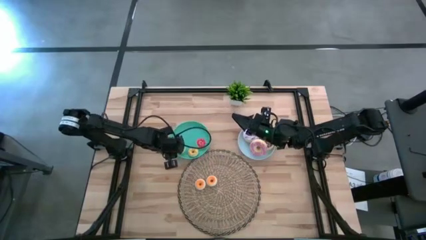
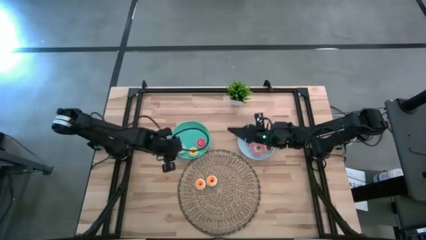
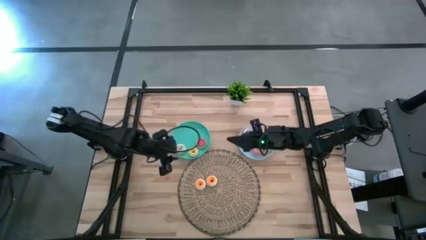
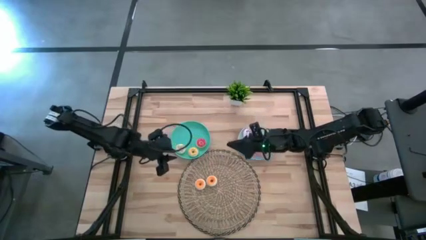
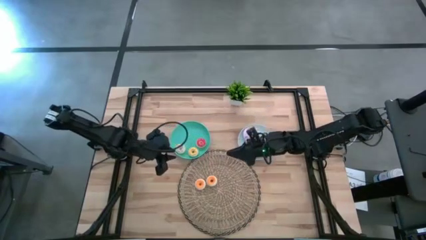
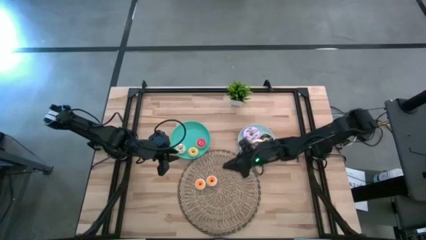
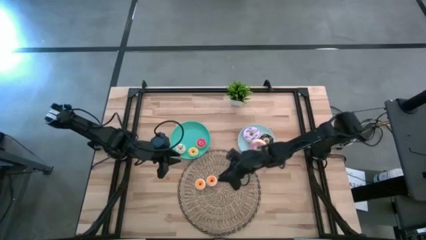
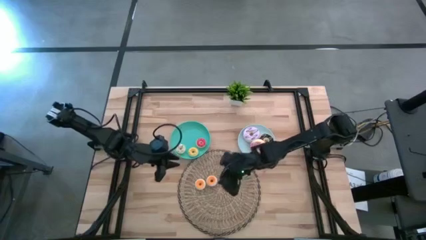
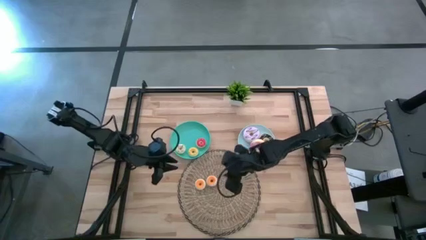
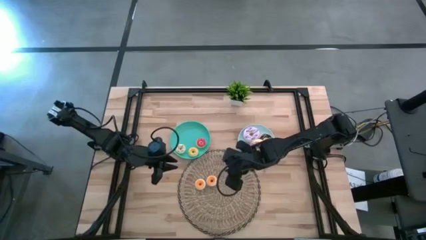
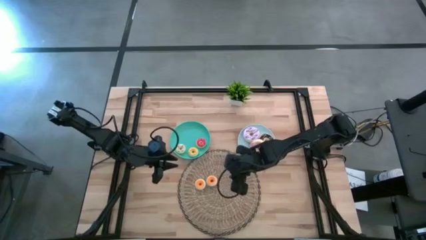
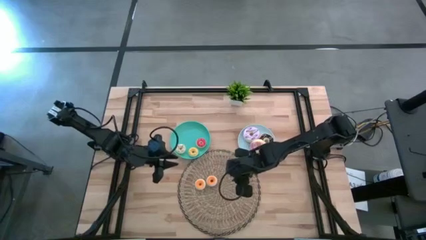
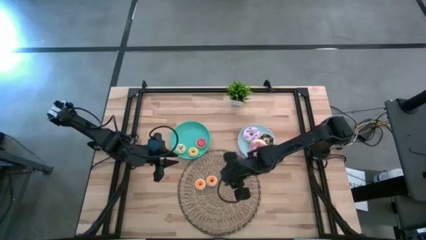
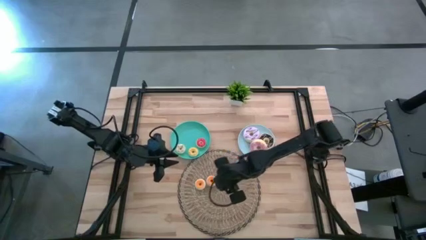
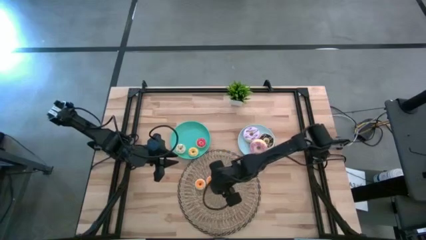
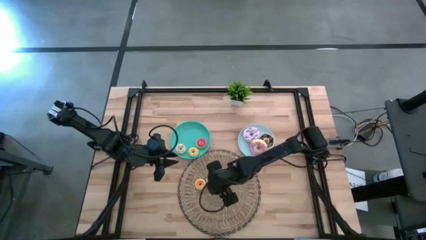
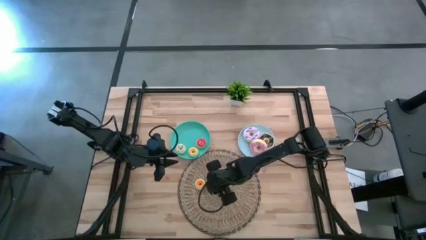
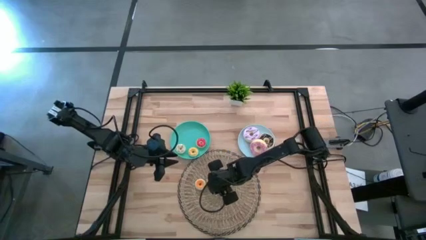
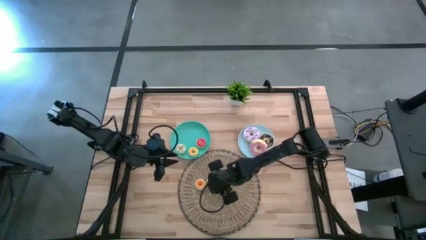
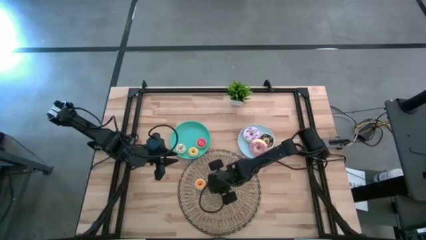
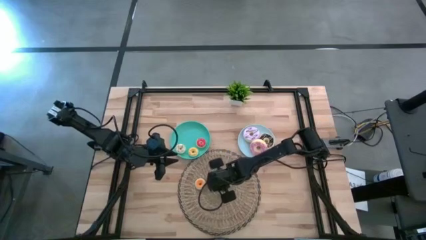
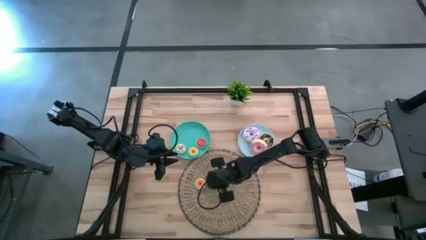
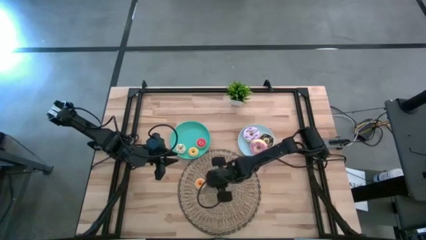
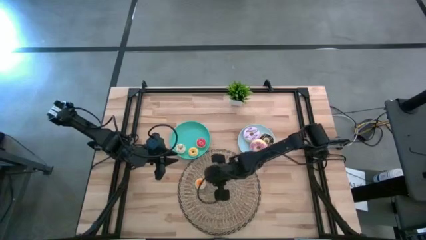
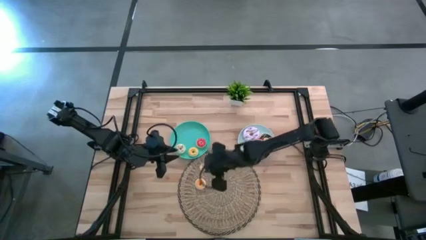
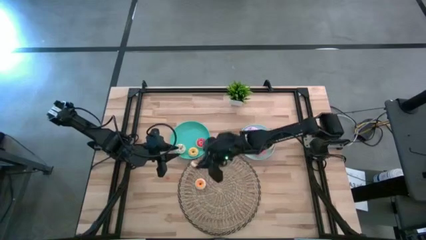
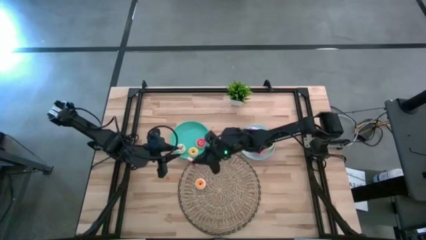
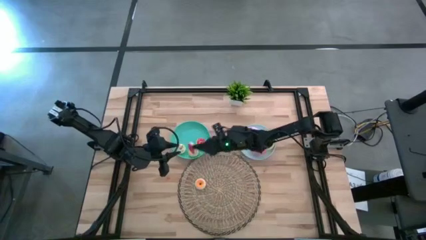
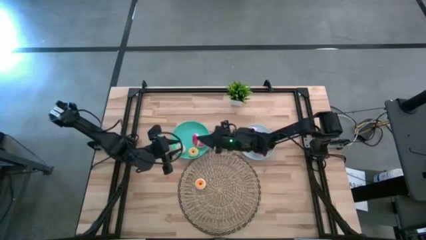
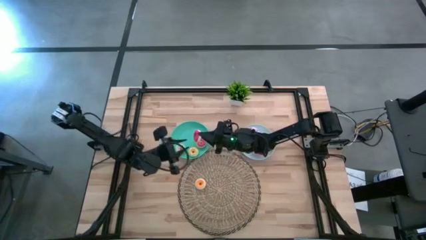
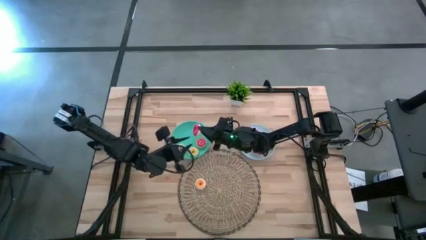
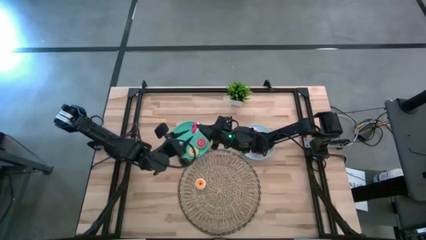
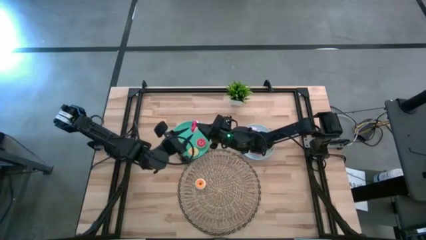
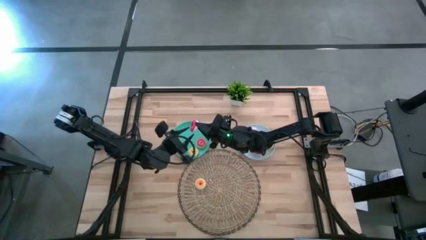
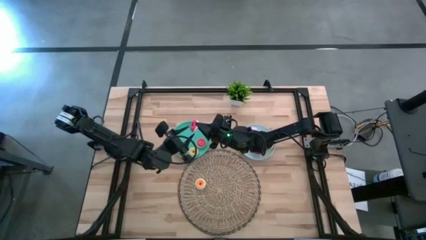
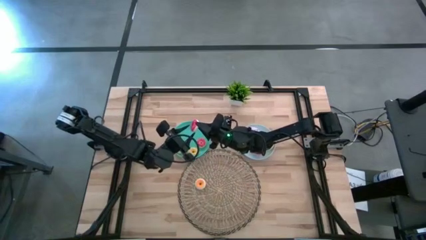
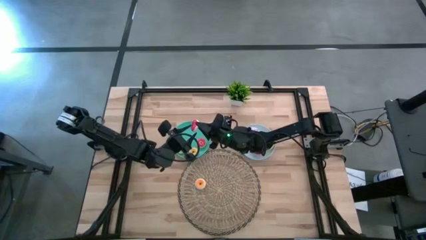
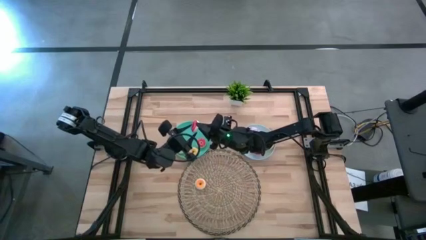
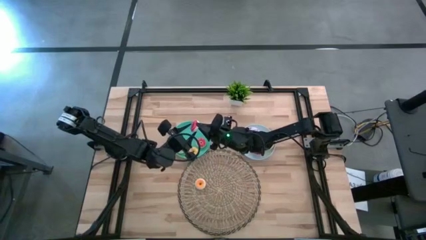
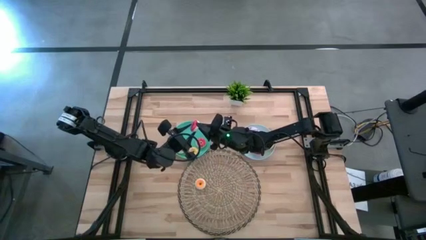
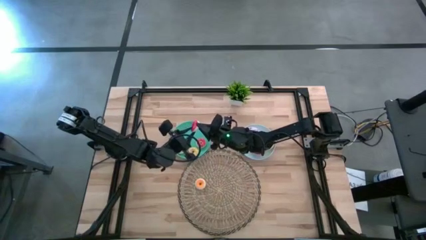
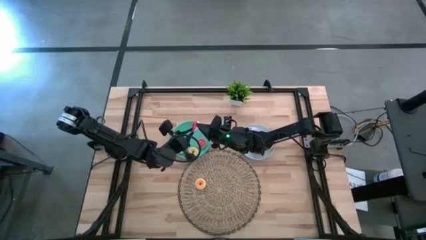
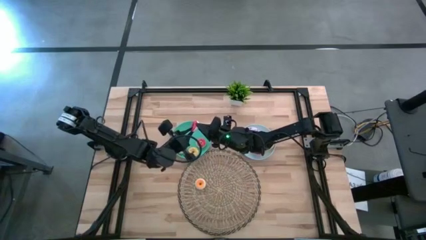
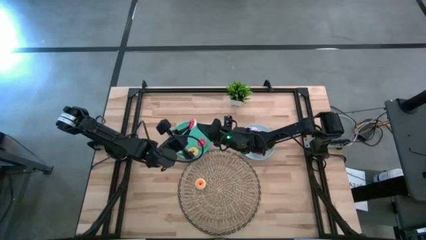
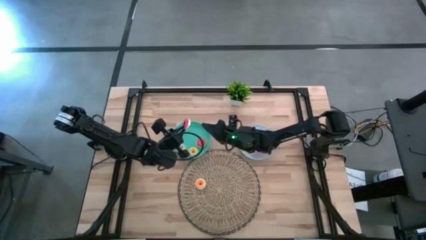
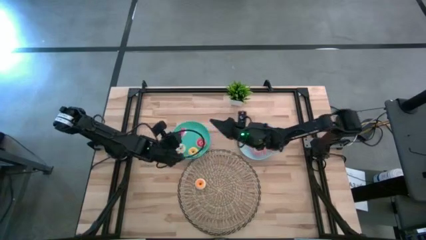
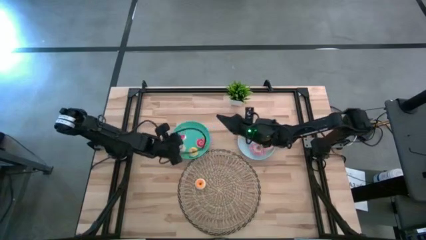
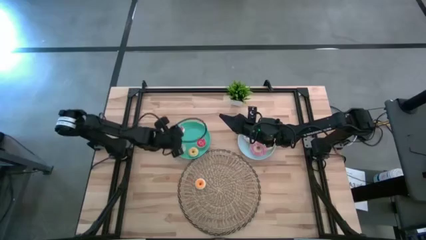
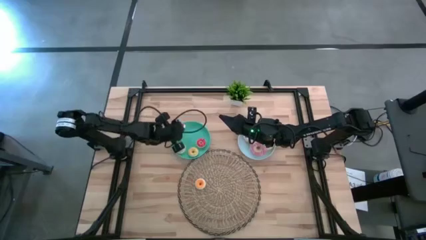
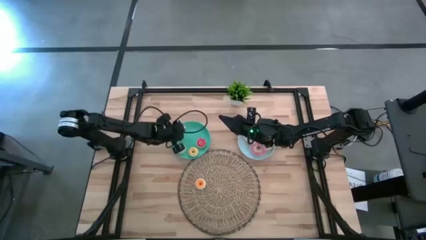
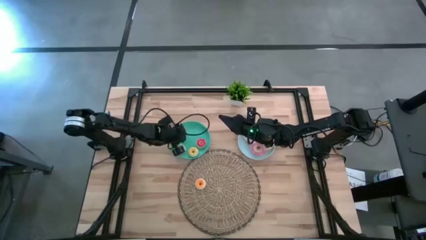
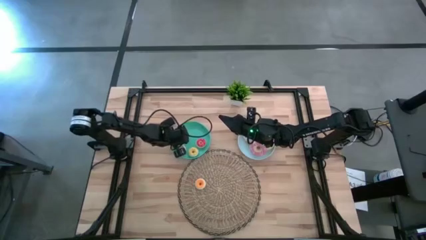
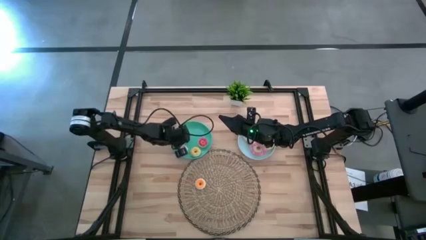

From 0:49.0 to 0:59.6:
Task: Pick & Place donuts
Put the small red doughnut on the green plate

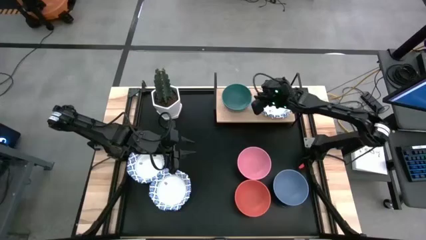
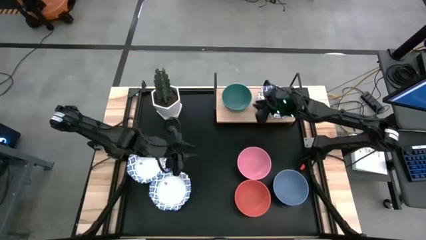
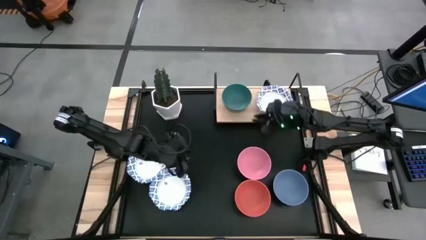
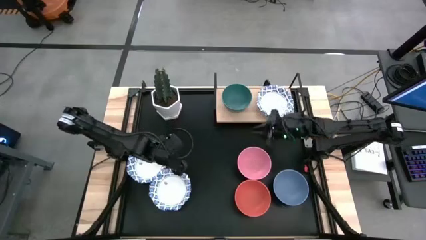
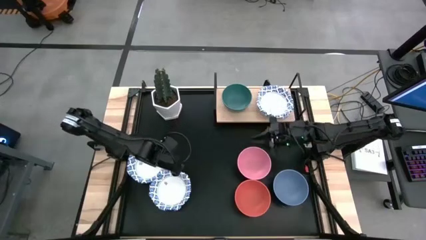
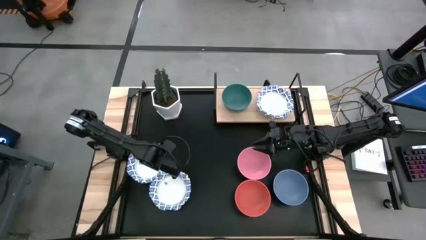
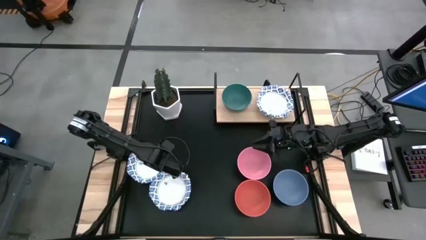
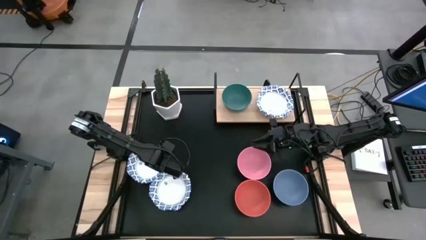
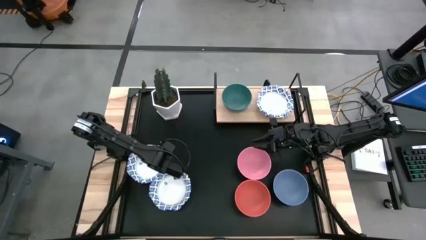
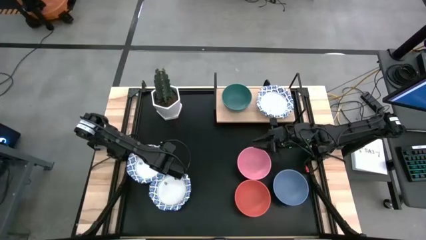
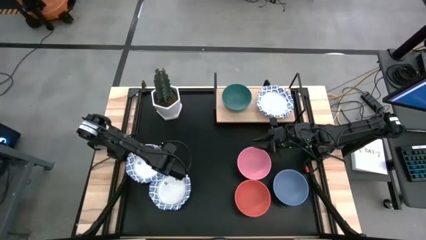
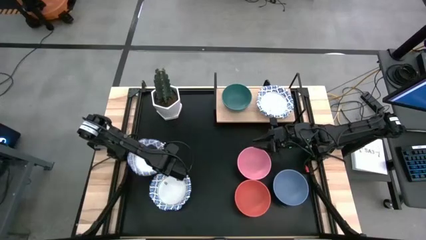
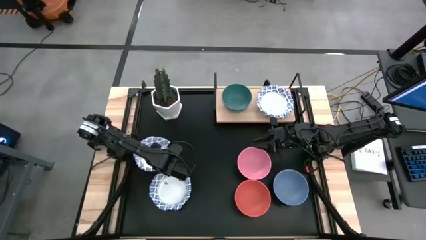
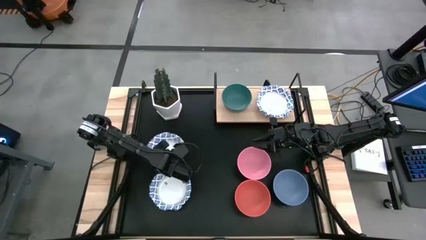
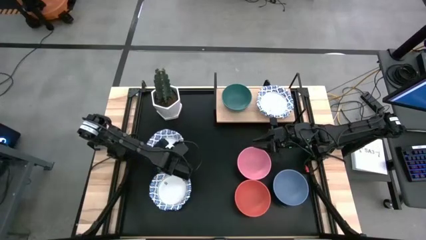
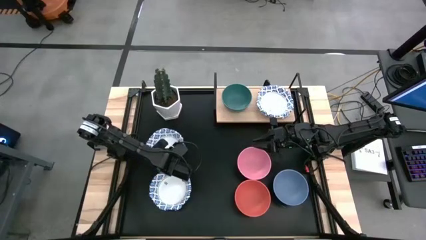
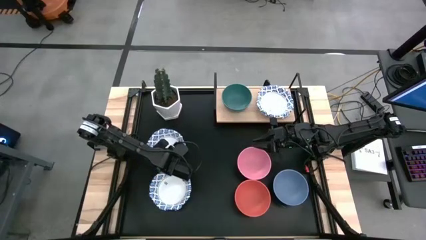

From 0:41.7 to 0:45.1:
Task: Place and stack bowls onto a shelf
Adjust the blue patterned bowl
